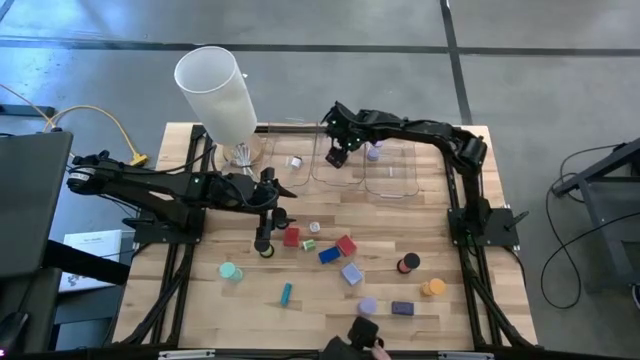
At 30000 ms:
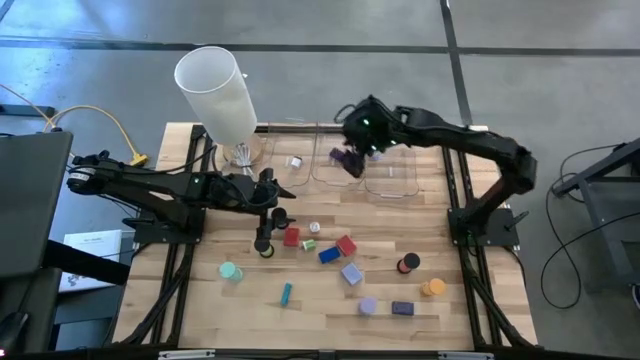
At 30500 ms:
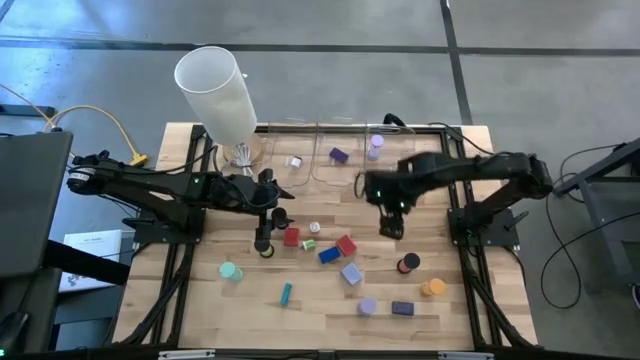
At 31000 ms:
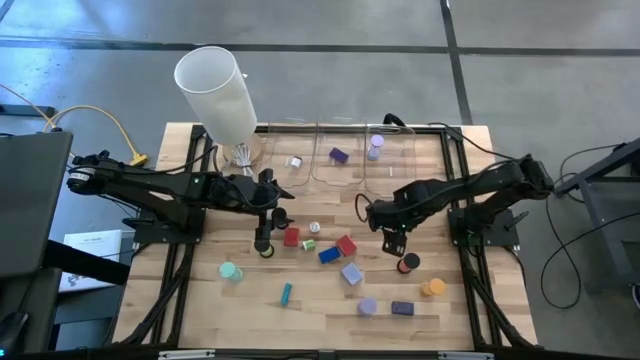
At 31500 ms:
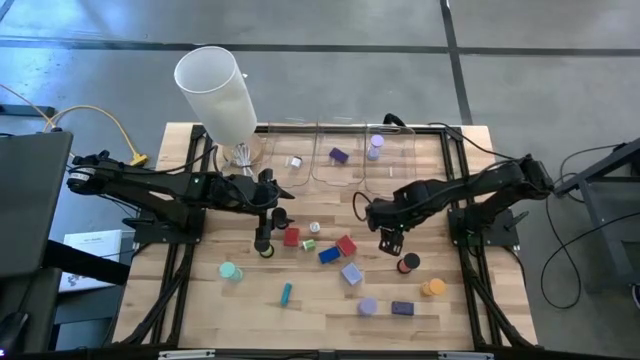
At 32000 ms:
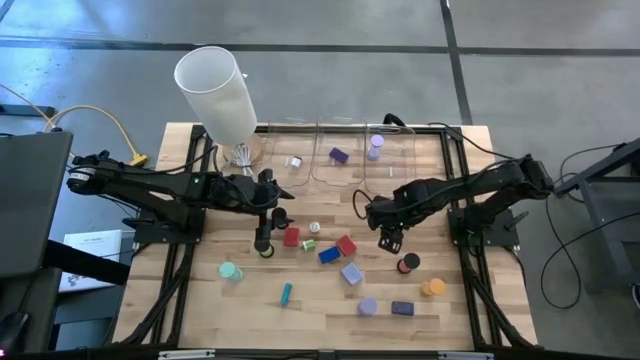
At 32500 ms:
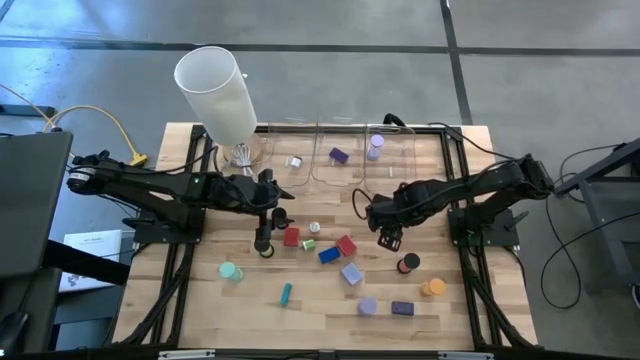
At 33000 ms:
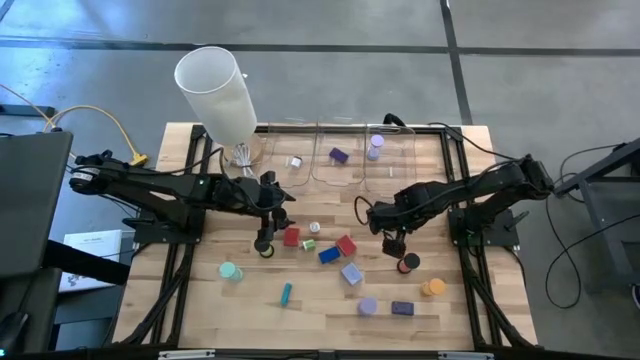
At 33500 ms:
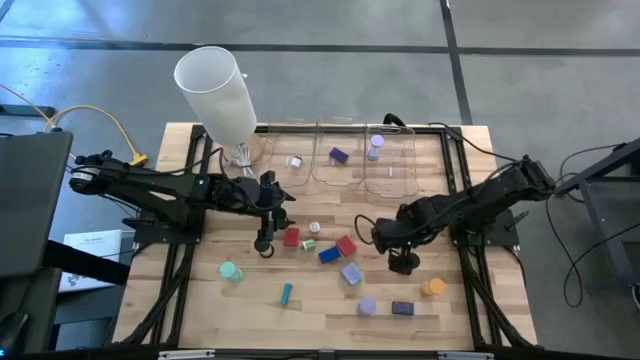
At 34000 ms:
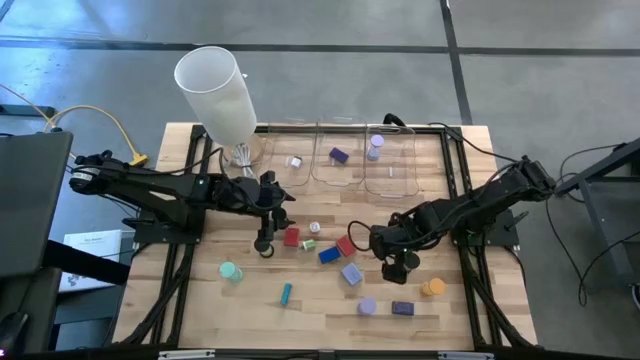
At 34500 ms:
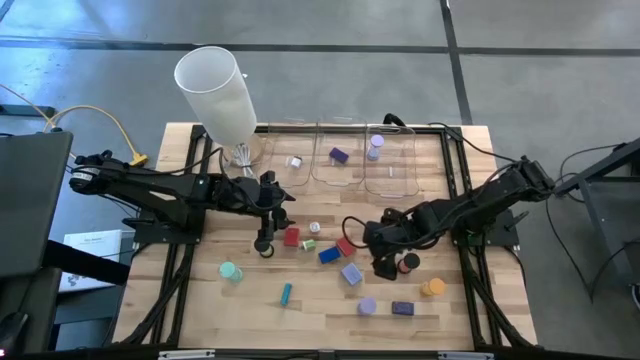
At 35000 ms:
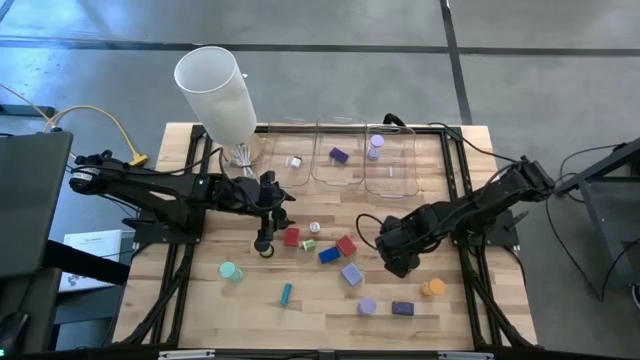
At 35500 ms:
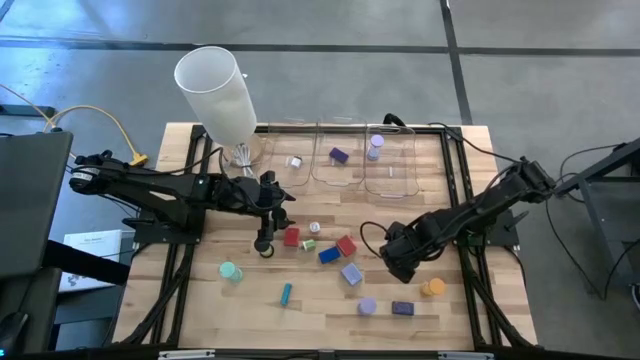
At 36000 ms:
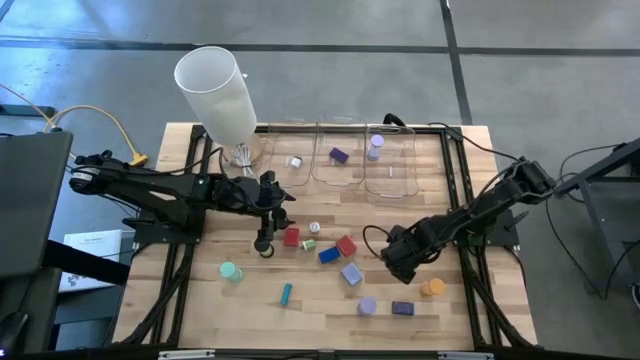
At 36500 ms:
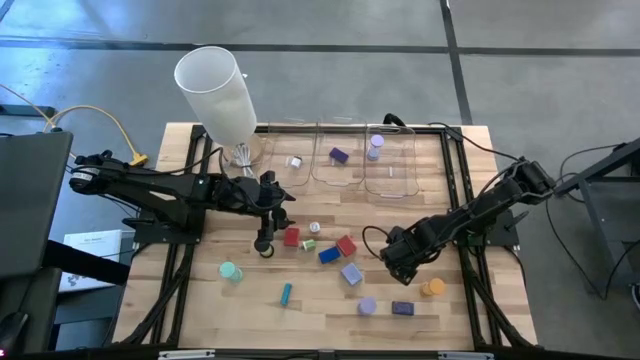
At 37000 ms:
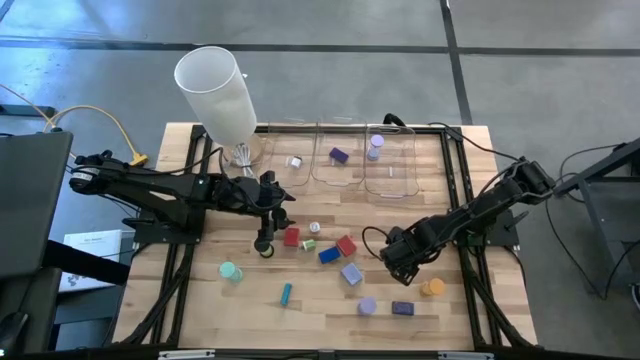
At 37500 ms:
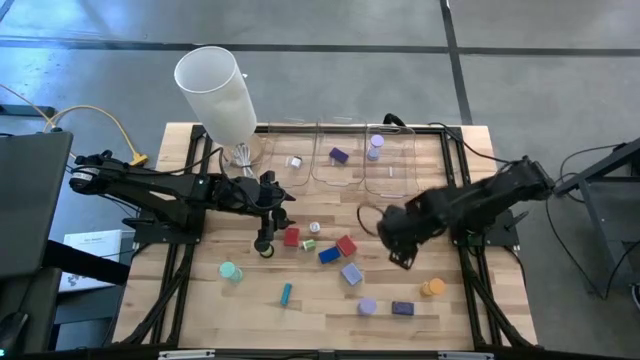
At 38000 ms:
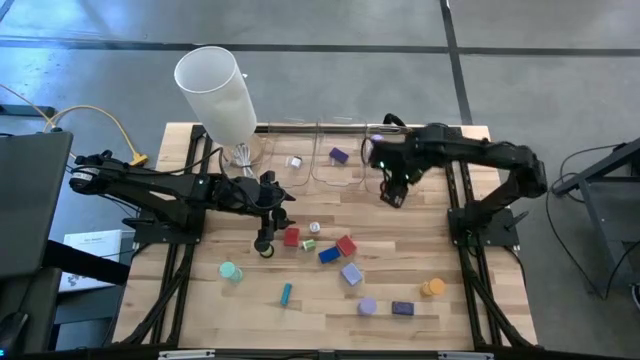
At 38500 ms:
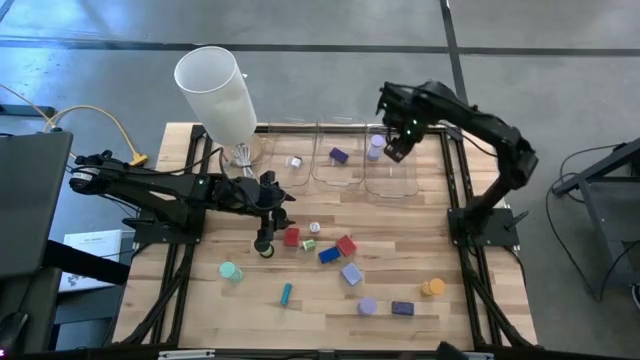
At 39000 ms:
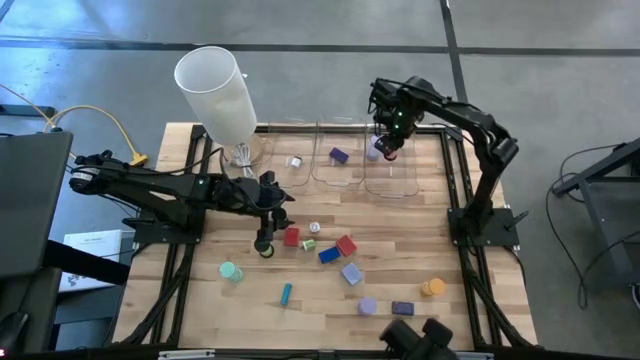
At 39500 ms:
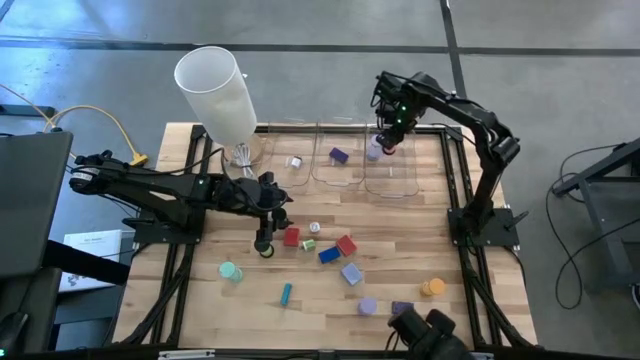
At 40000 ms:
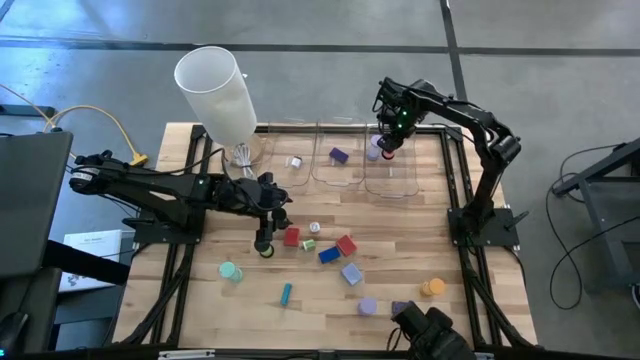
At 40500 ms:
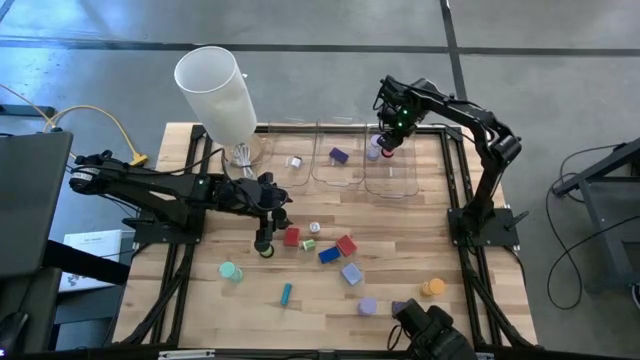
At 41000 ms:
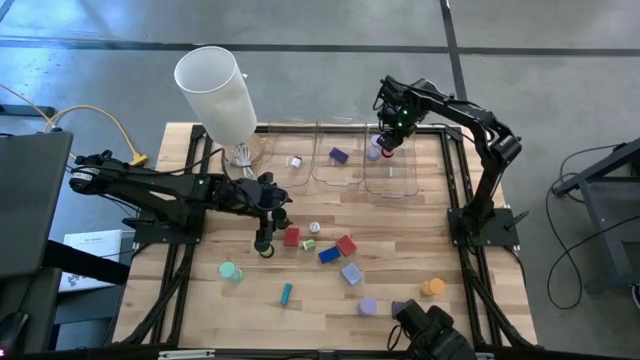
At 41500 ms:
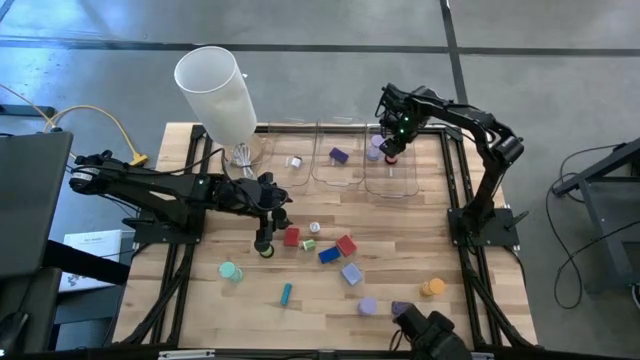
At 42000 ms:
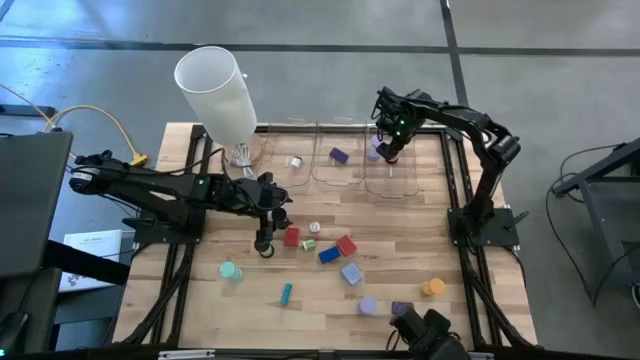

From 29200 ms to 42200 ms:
Task: Pick & Place Office items
Put the red hourglass into the right transparent bin

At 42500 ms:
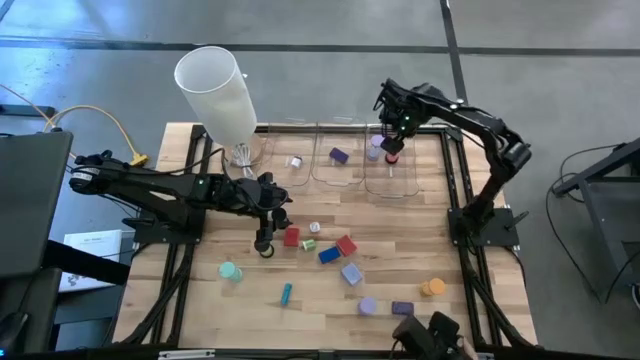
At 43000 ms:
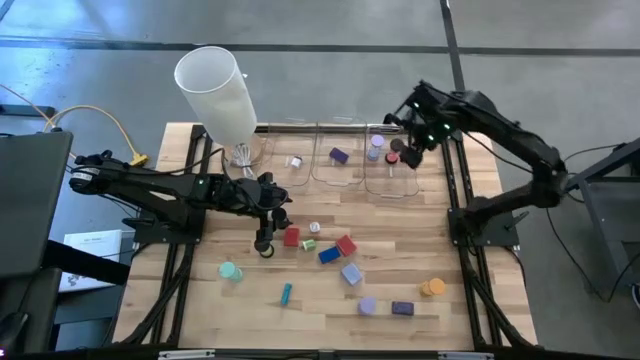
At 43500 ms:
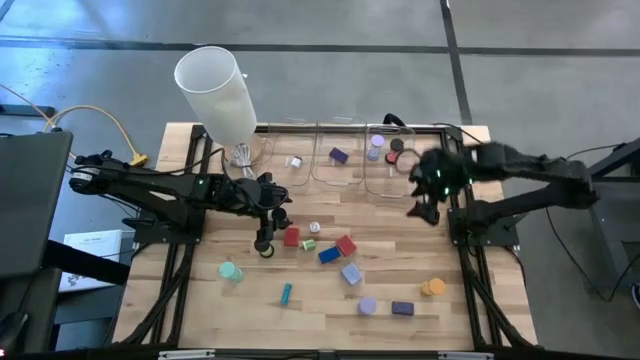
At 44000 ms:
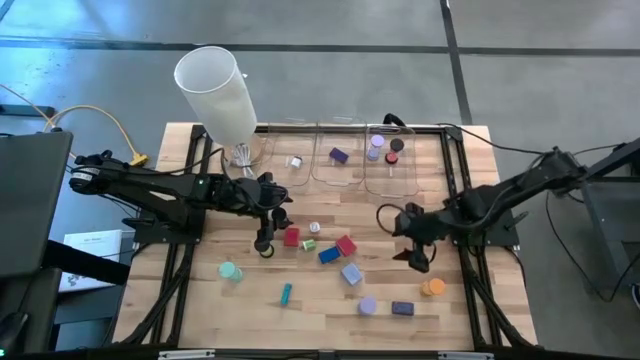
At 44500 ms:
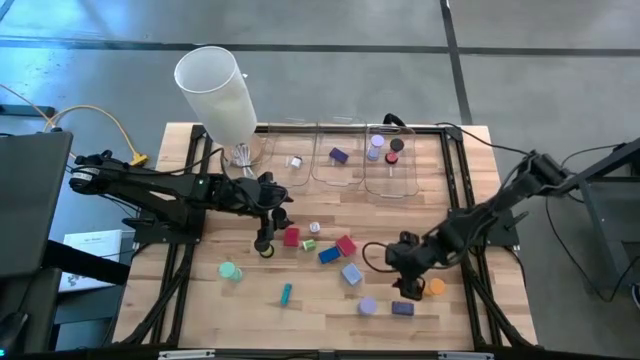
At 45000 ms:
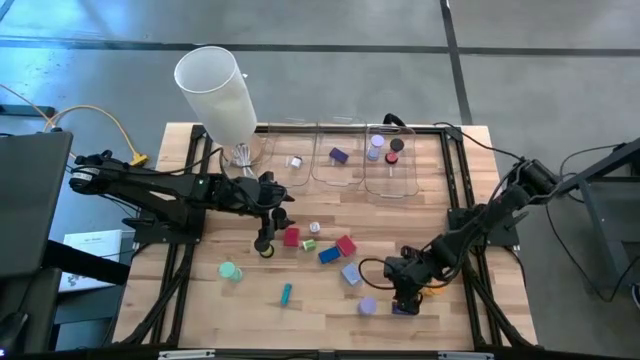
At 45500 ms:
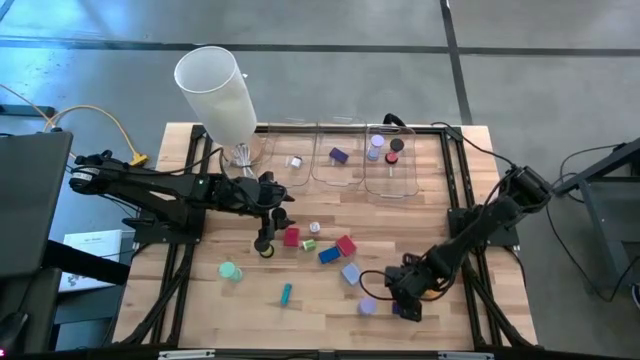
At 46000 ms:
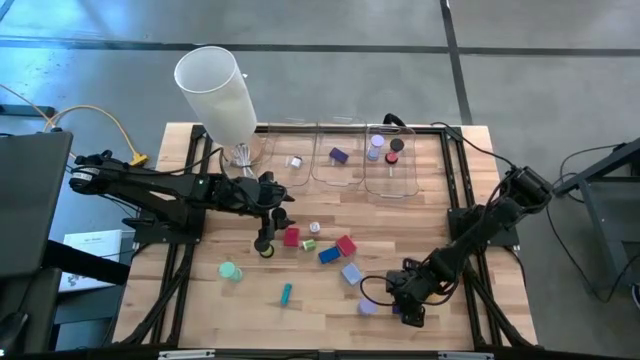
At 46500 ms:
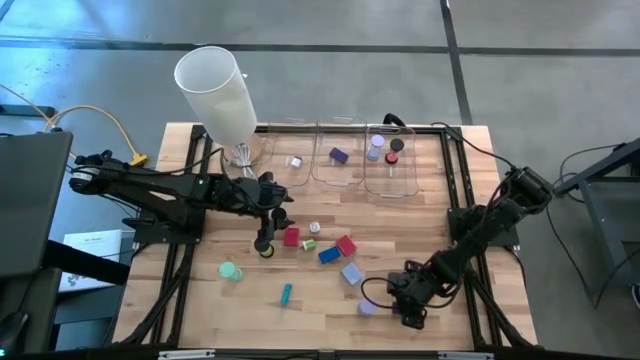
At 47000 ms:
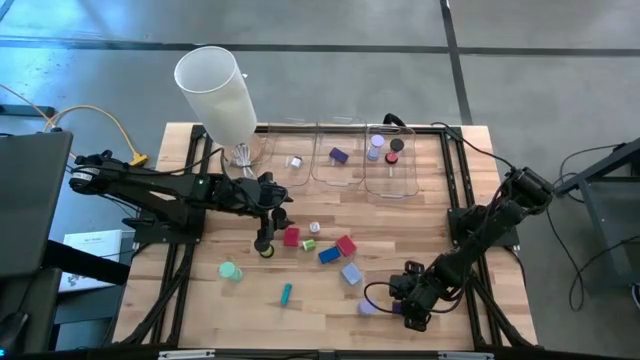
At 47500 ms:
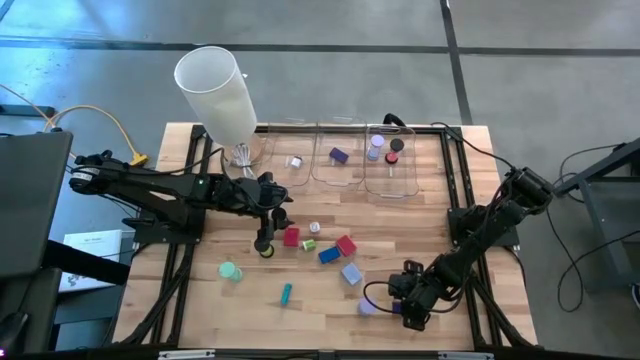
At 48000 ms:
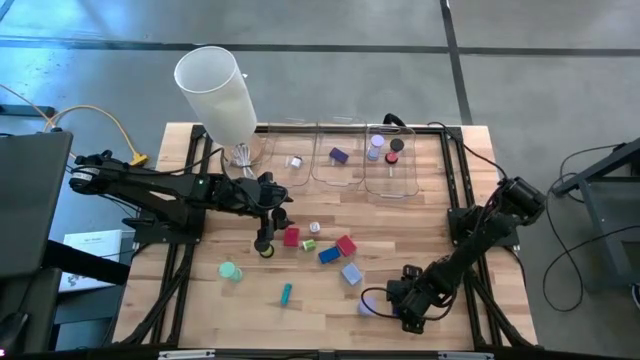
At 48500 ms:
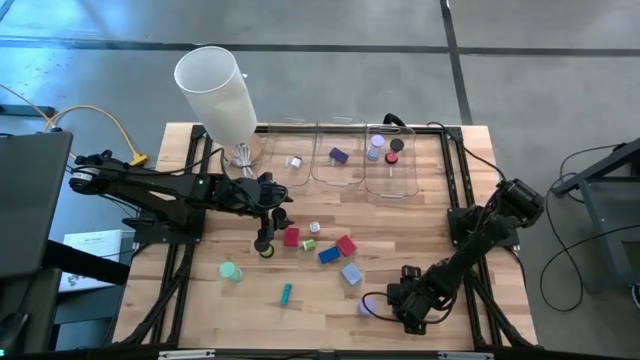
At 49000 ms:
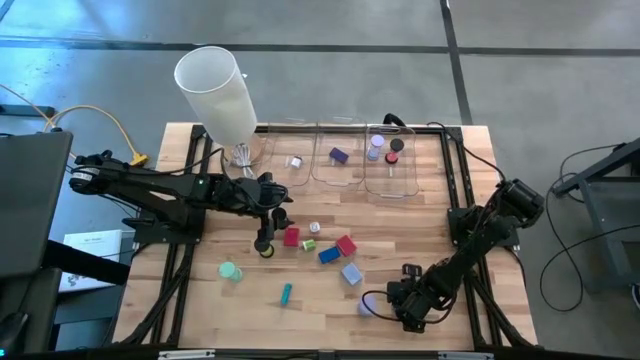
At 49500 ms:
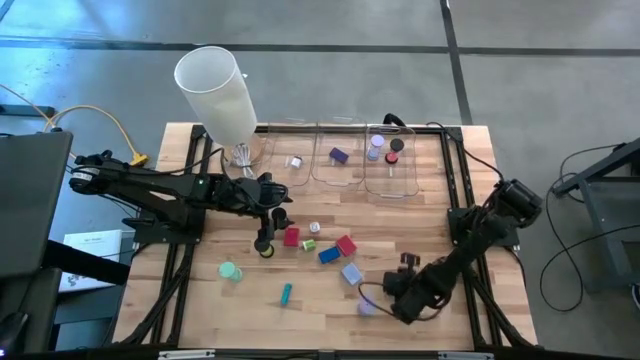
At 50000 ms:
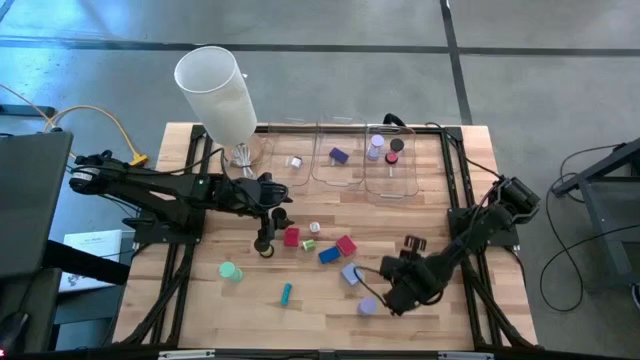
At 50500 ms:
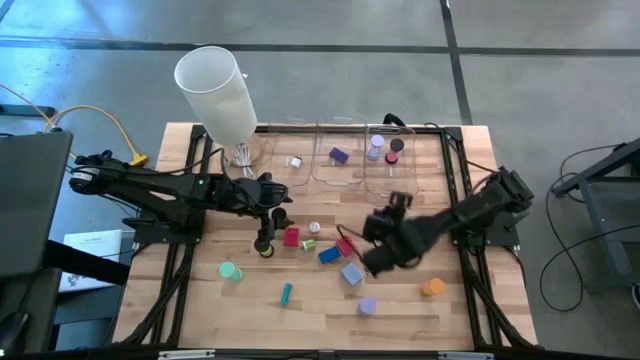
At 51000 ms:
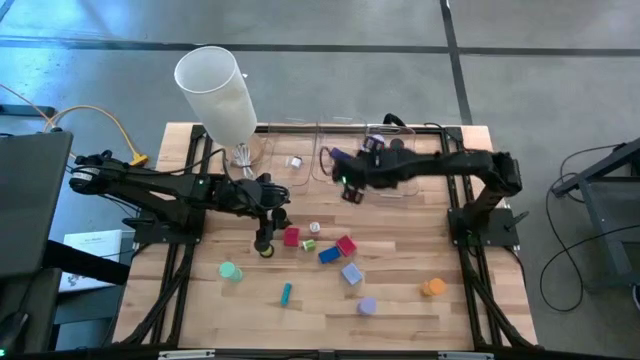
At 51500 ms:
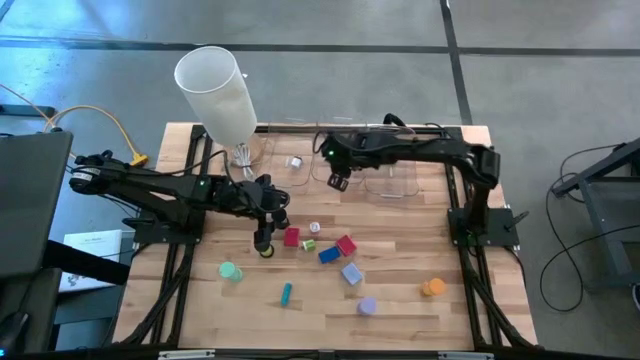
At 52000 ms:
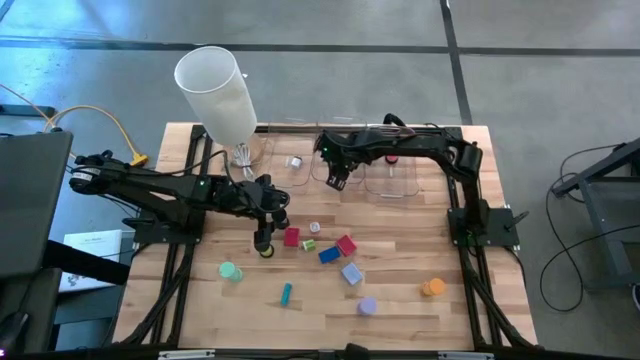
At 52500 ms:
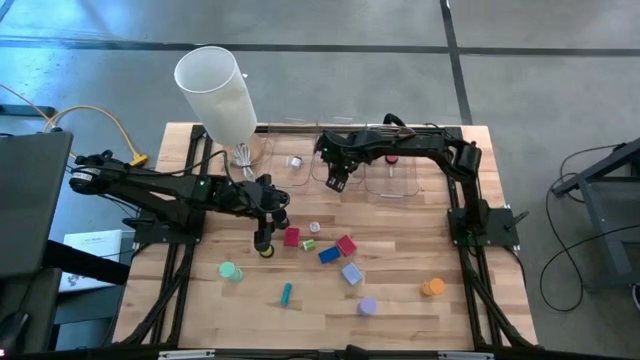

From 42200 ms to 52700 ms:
Put the dark blue digital clock into the middle transparent bin
